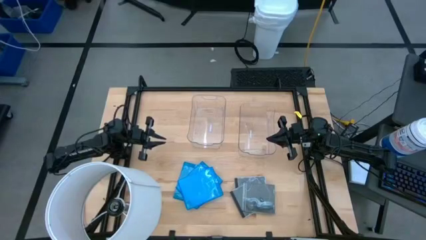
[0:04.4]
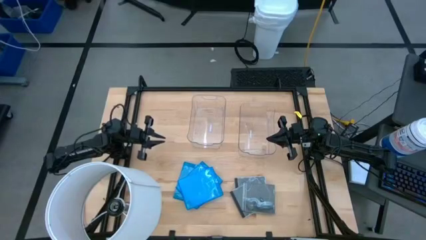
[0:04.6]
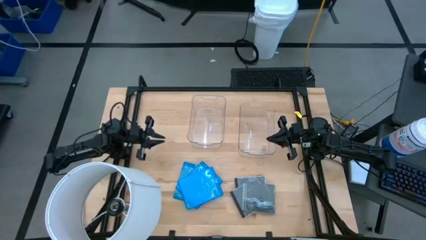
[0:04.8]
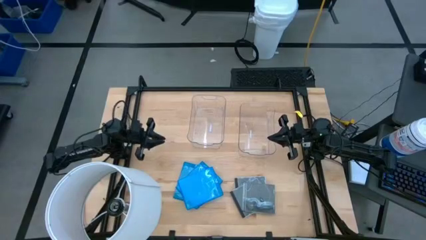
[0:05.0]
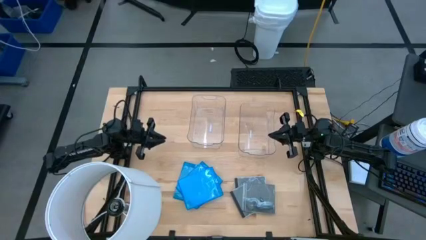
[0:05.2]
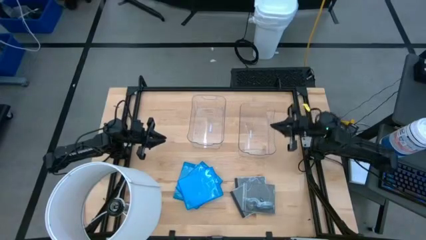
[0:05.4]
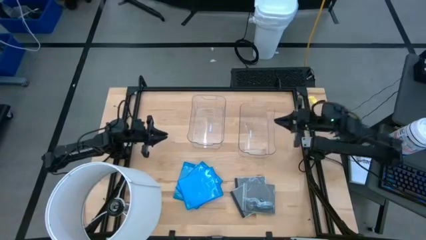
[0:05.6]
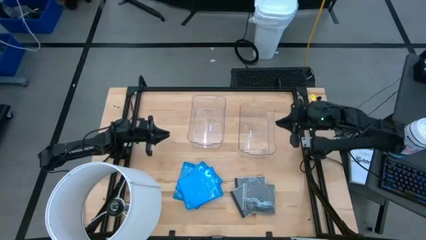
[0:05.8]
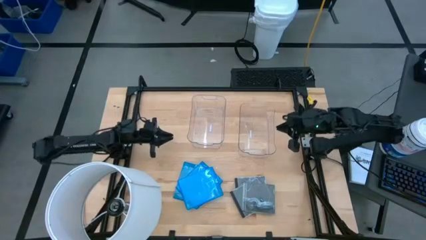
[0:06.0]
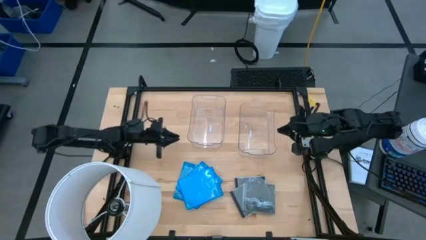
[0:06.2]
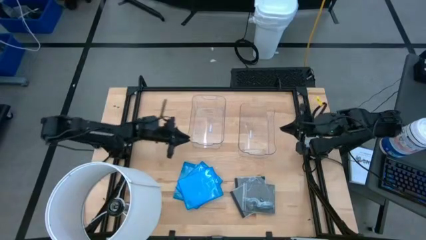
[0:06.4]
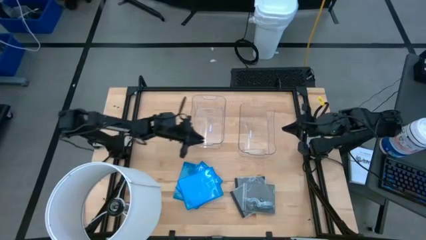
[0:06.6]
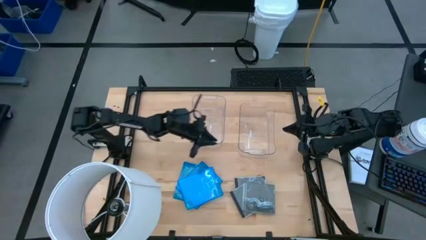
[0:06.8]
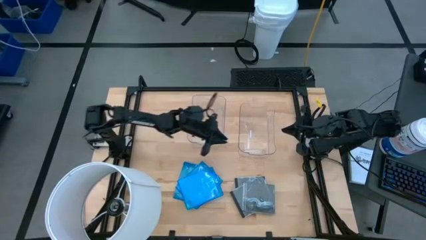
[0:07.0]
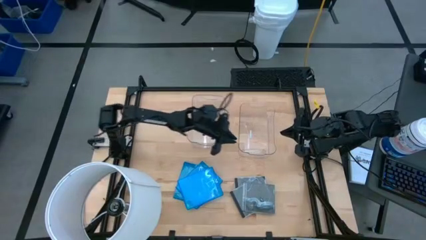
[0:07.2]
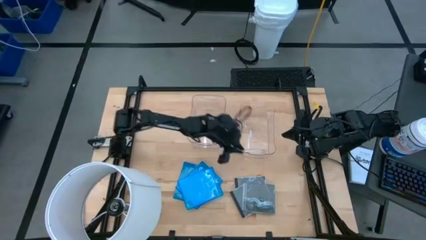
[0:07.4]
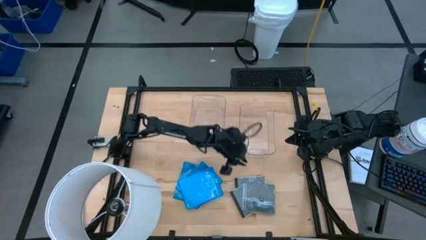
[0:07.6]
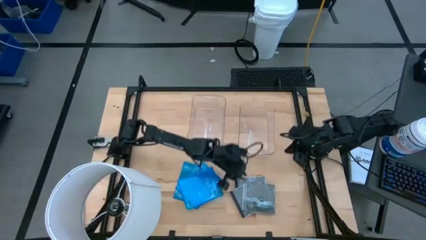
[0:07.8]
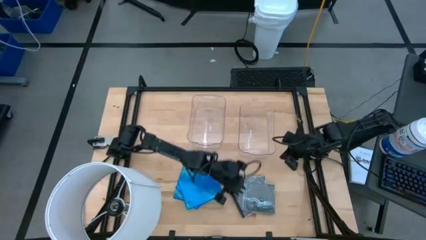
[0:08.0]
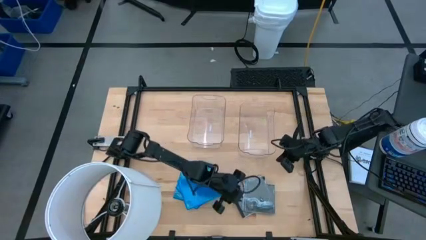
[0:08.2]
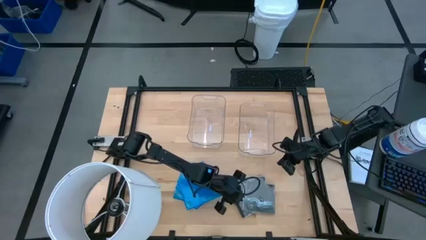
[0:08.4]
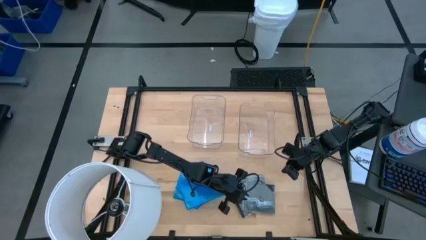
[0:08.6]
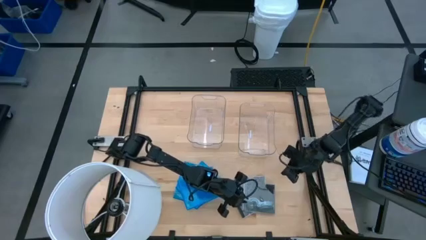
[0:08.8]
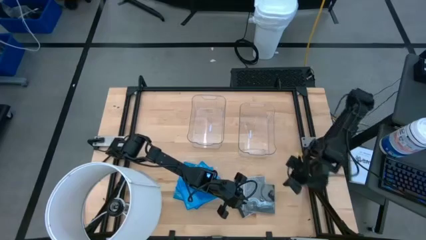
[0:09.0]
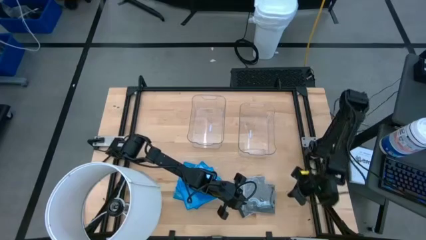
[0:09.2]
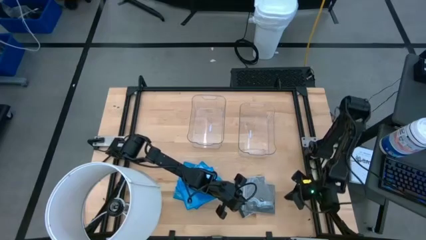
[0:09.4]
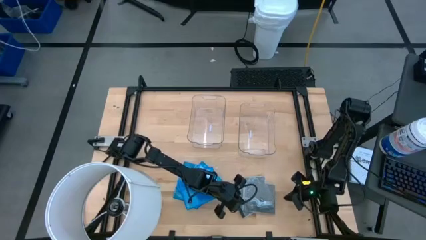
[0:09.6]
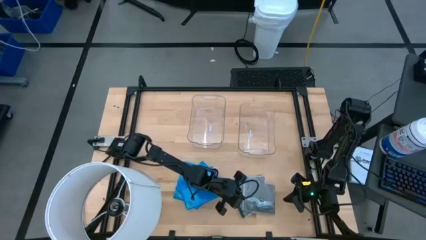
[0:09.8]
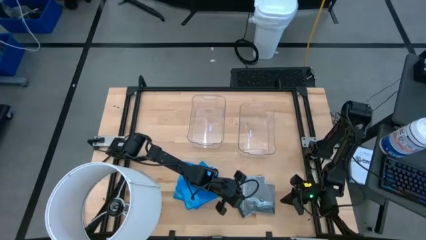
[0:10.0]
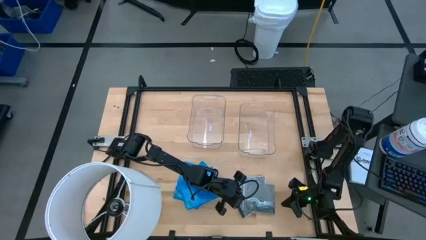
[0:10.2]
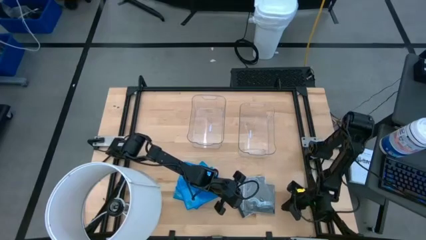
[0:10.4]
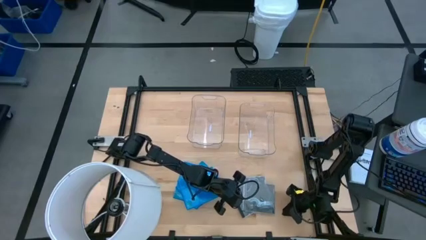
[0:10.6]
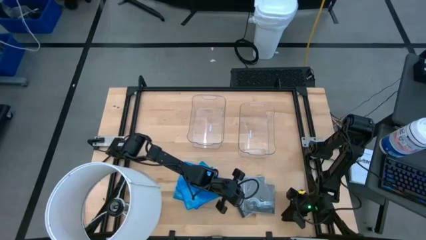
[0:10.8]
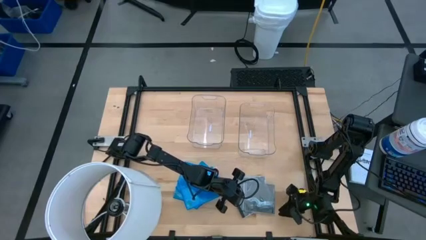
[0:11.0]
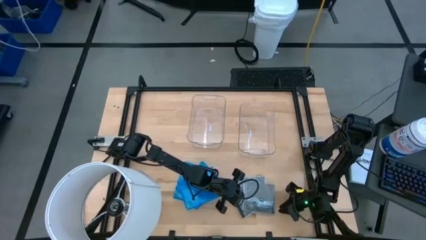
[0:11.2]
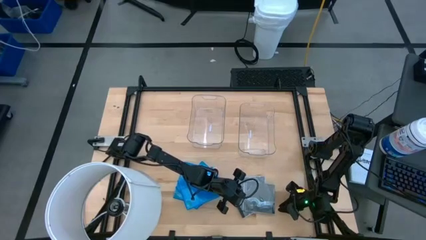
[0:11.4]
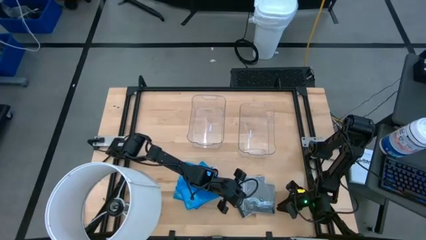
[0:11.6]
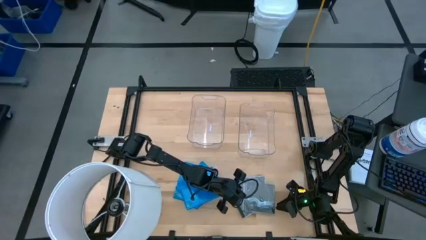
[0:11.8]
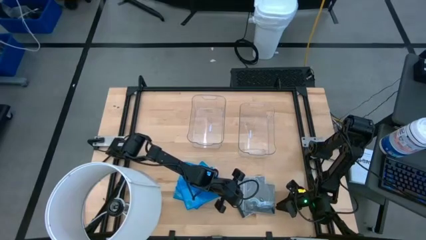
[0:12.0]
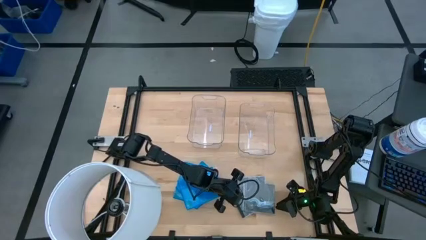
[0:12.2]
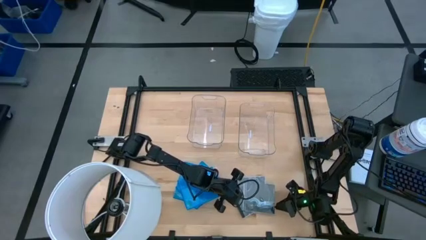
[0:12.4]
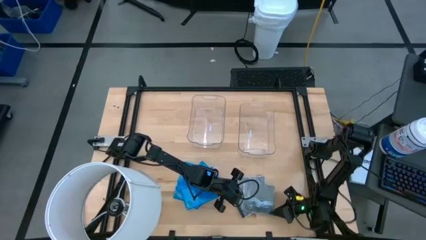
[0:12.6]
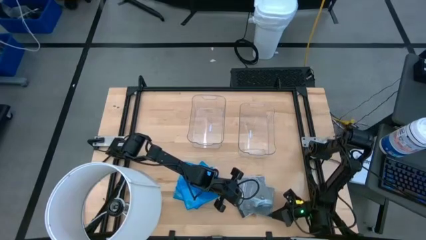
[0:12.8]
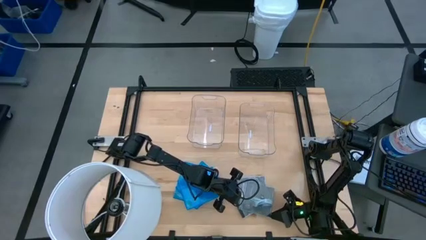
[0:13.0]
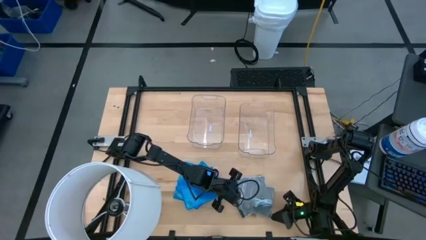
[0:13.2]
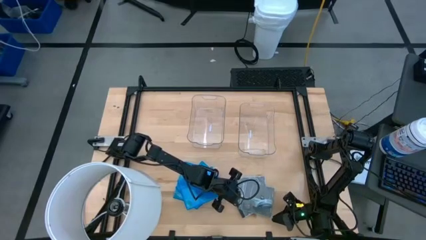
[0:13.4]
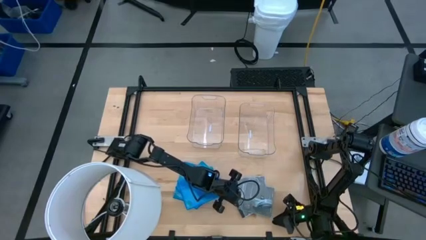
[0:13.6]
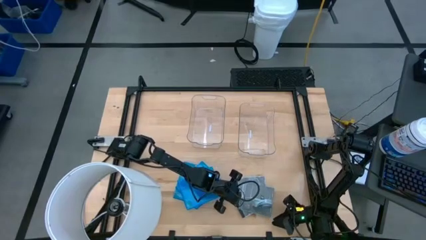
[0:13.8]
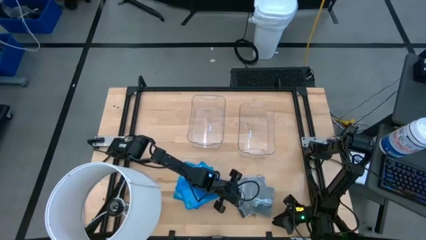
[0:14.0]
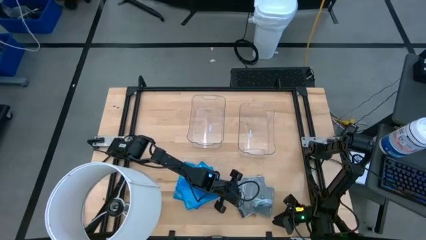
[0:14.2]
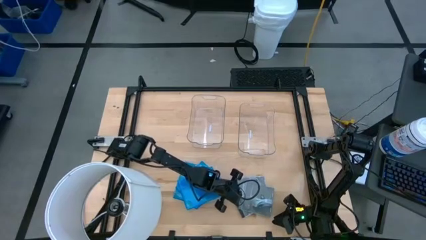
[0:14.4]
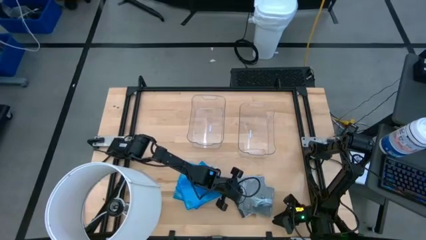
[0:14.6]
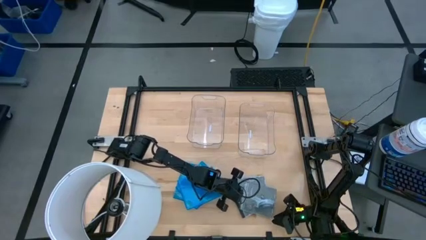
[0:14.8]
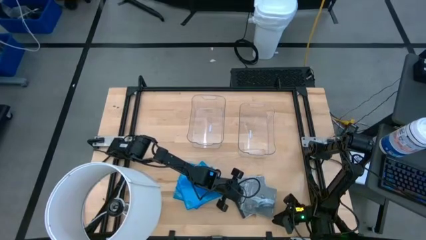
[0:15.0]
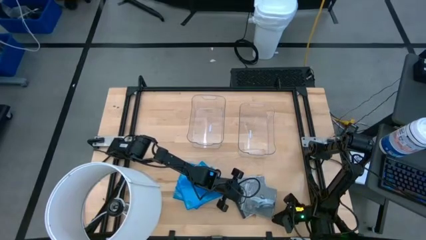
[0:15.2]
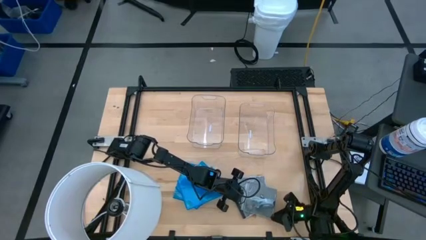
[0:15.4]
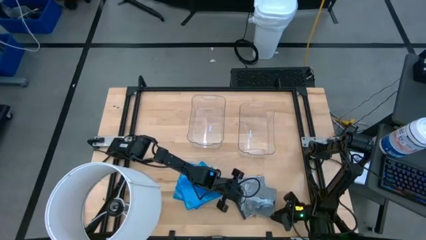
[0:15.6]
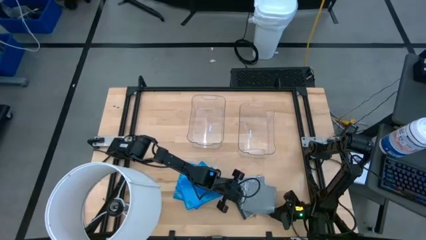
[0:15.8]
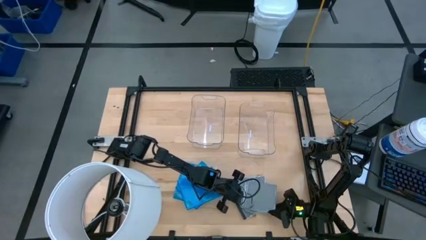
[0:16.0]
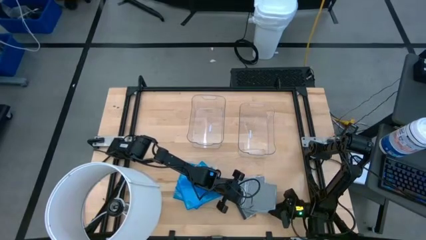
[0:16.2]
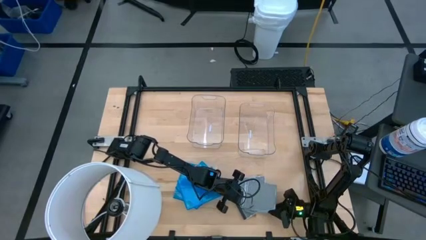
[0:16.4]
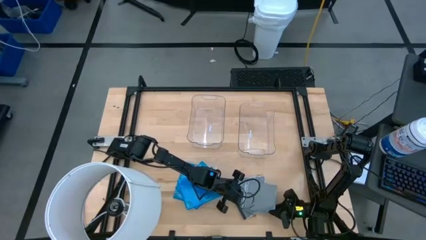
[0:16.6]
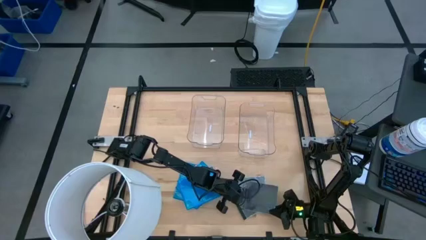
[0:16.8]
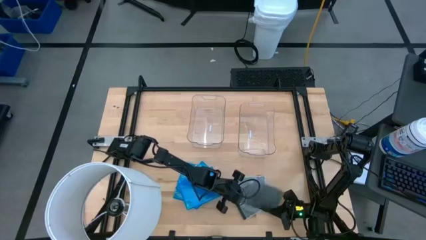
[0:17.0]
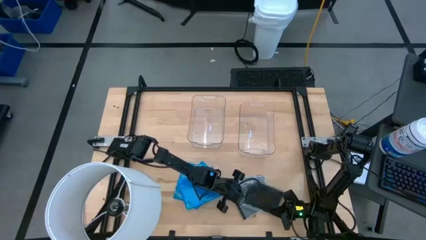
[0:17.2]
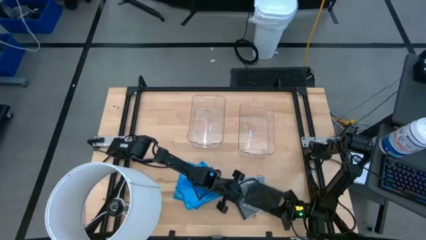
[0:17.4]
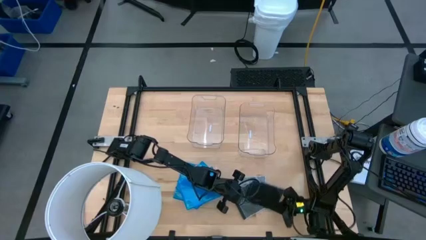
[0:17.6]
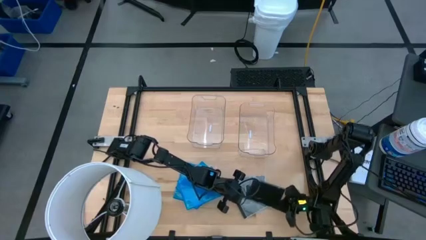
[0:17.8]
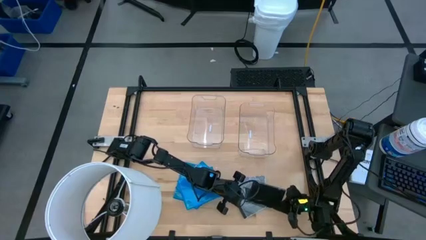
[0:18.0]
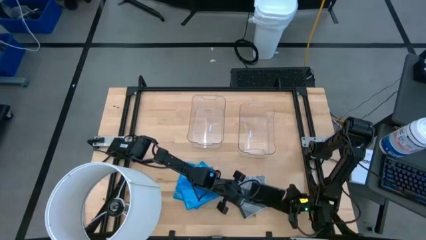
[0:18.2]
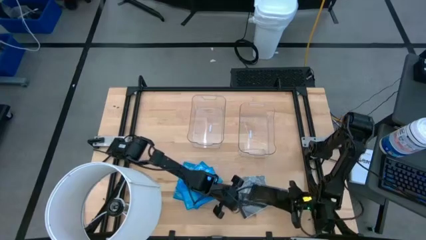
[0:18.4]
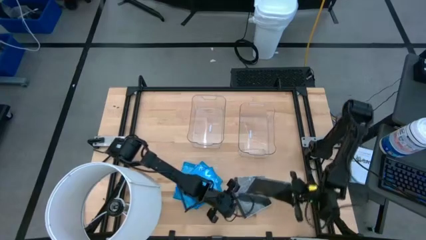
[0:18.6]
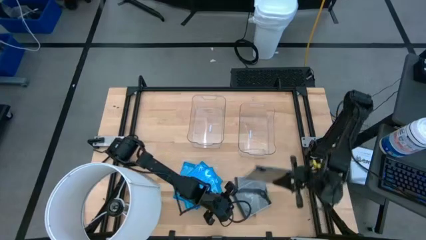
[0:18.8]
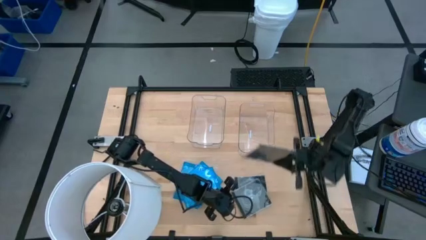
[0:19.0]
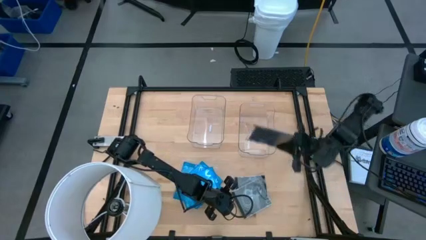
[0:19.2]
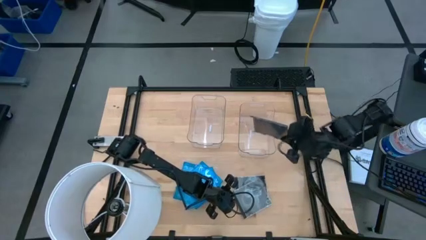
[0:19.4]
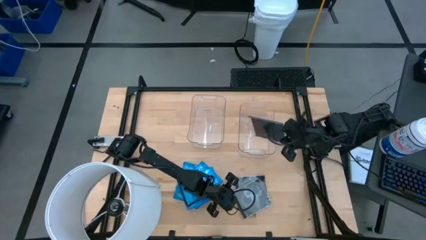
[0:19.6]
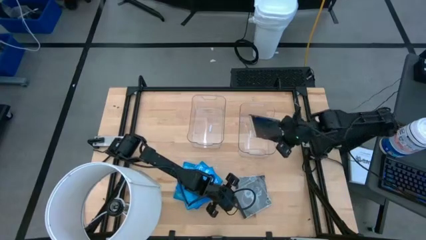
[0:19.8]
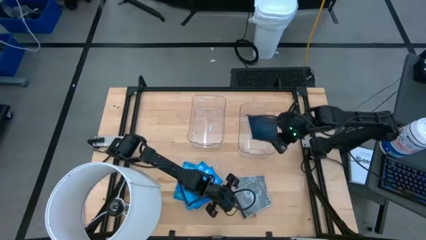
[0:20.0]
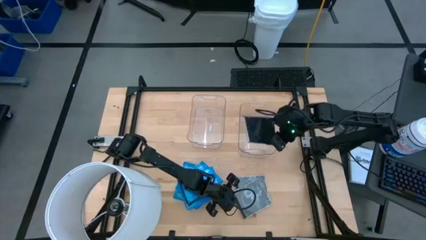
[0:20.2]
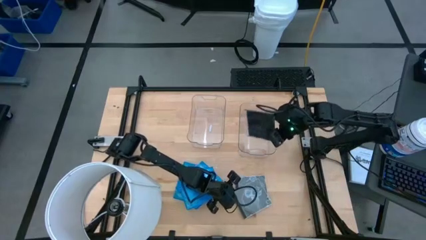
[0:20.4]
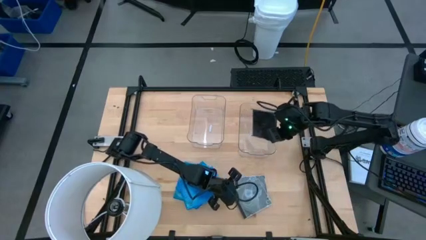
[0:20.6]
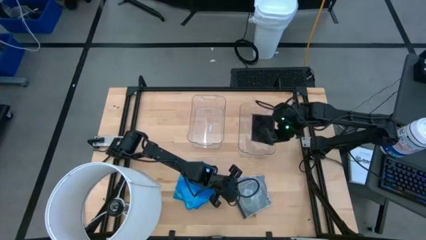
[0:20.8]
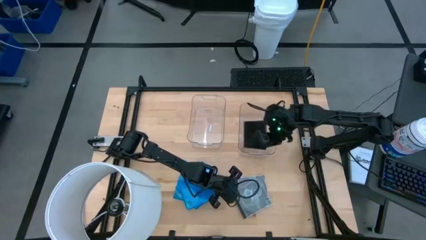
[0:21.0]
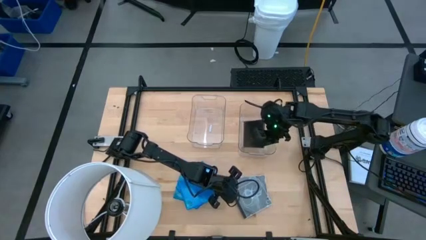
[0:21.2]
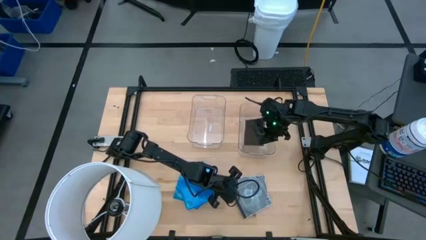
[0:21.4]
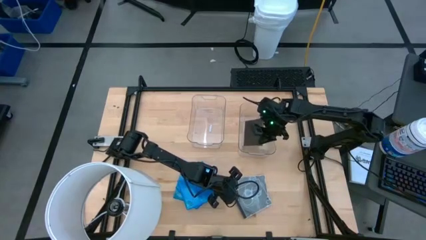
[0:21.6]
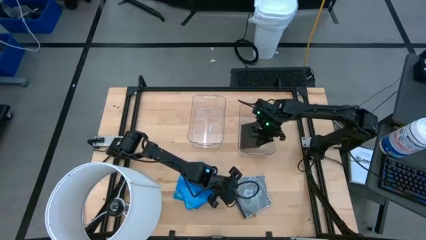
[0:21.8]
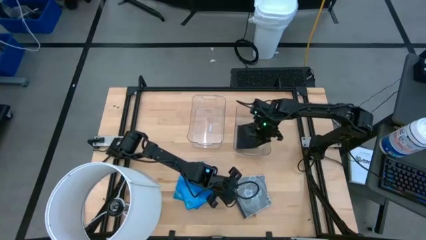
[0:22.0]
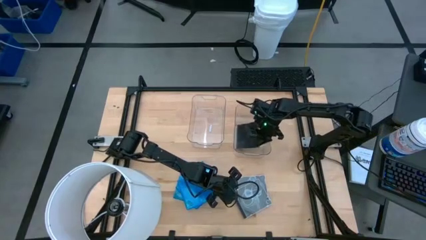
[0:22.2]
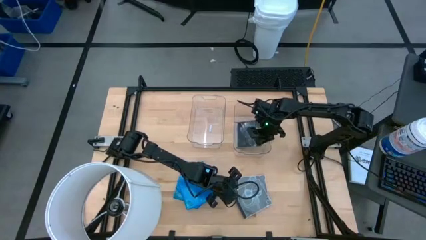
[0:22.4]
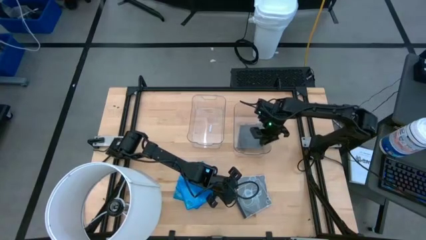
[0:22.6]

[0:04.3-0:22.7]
Task: Pick & place jewel cases by type
Put the black CD case into the right transparent bin
